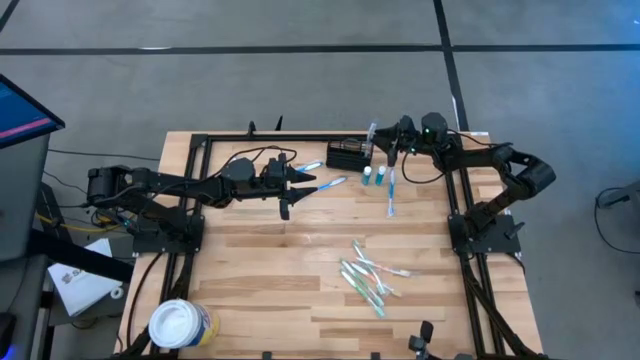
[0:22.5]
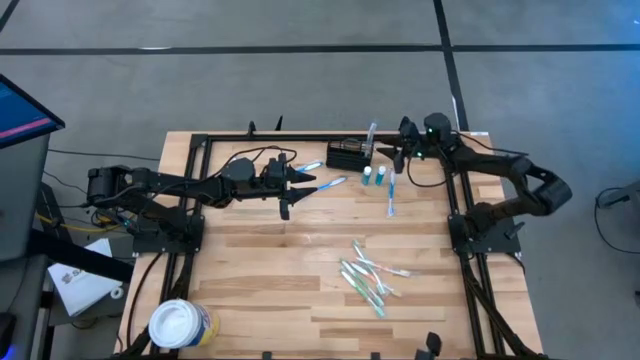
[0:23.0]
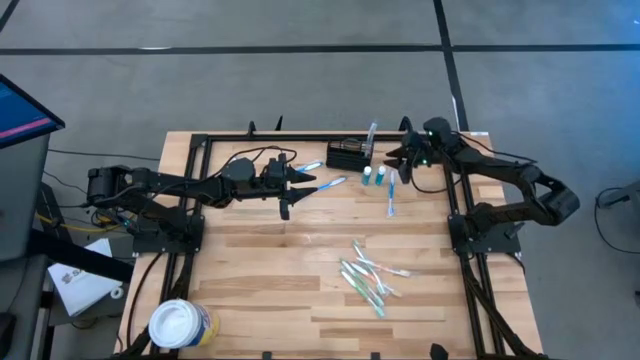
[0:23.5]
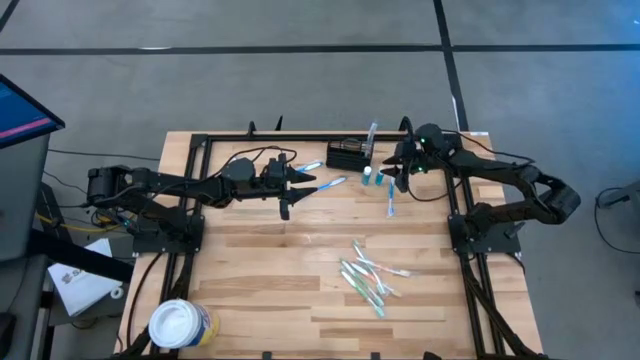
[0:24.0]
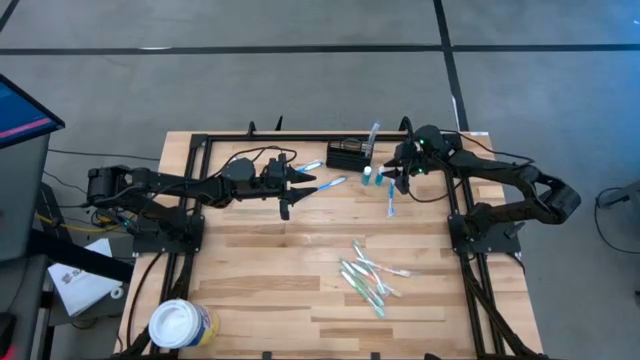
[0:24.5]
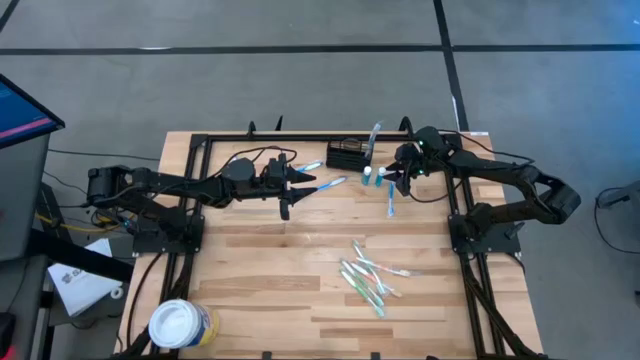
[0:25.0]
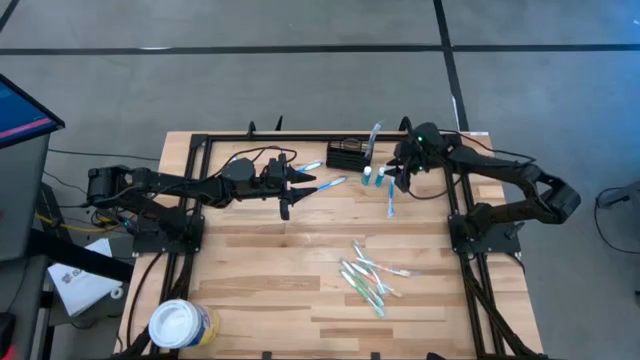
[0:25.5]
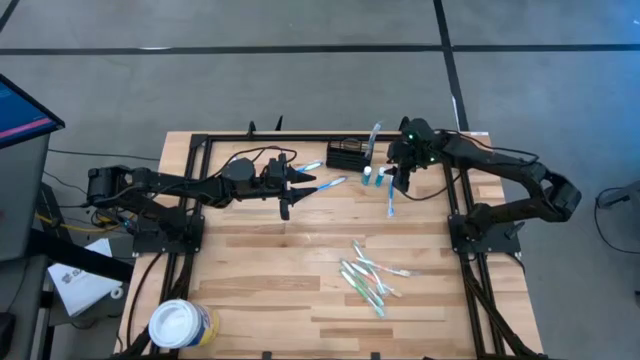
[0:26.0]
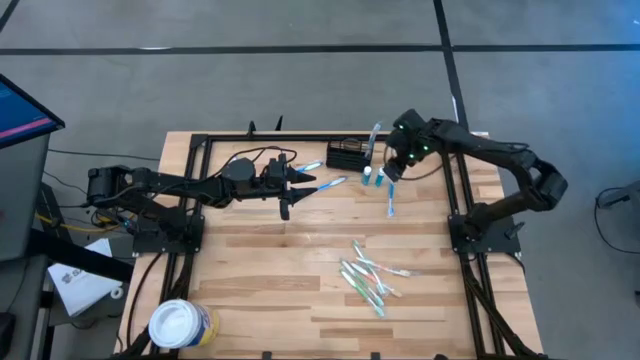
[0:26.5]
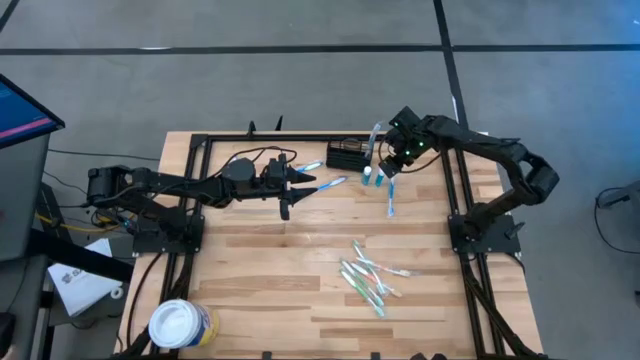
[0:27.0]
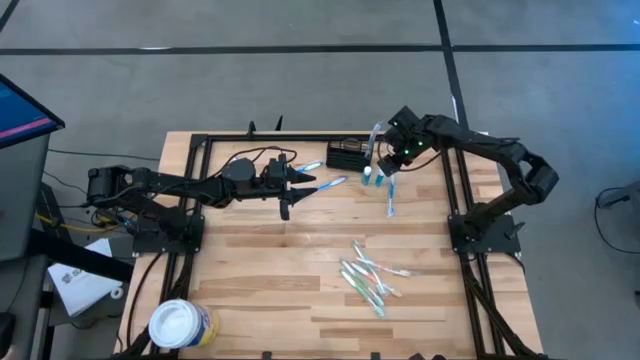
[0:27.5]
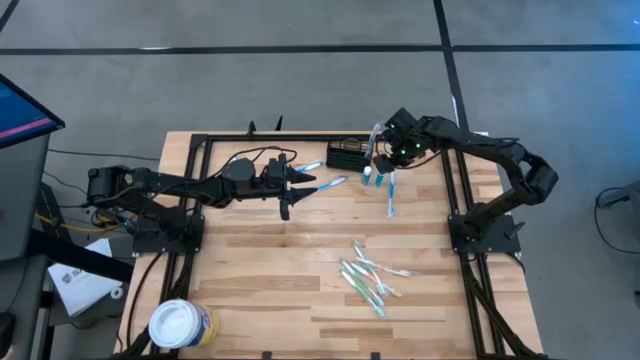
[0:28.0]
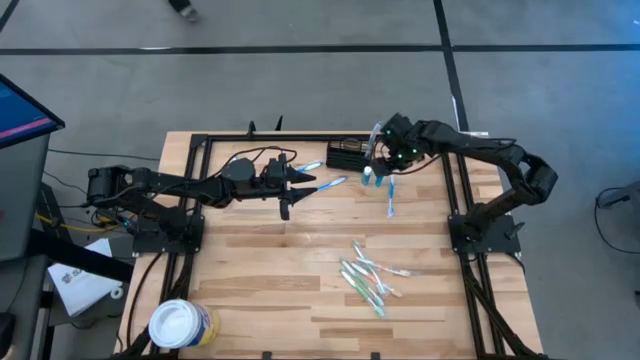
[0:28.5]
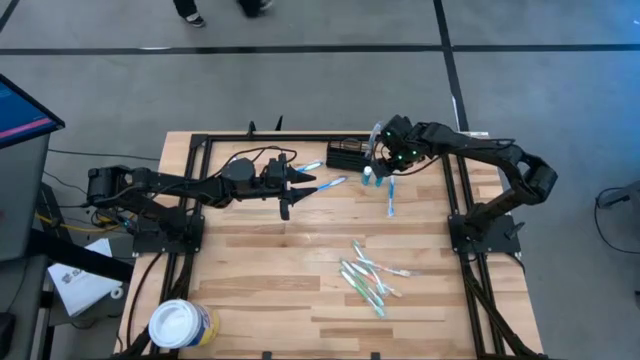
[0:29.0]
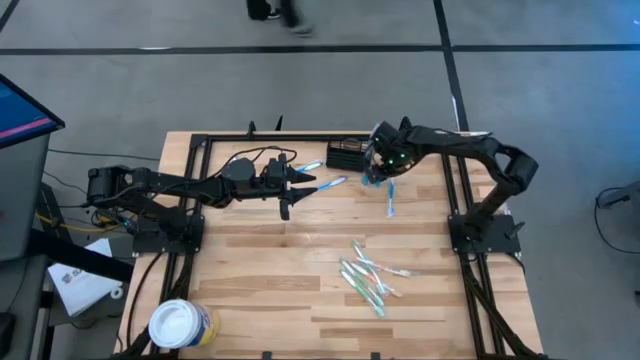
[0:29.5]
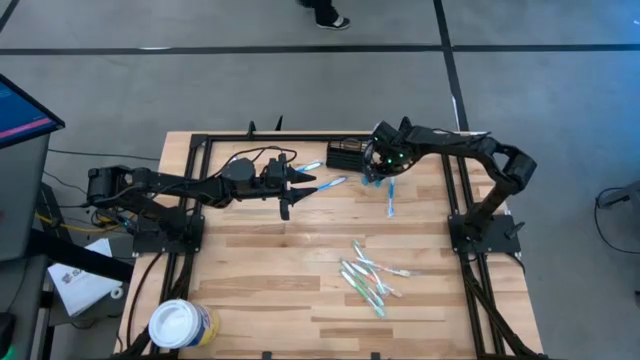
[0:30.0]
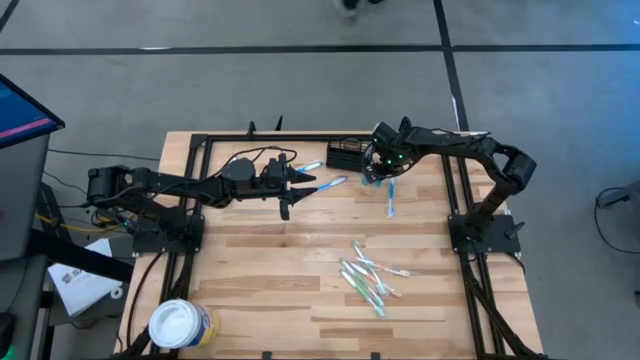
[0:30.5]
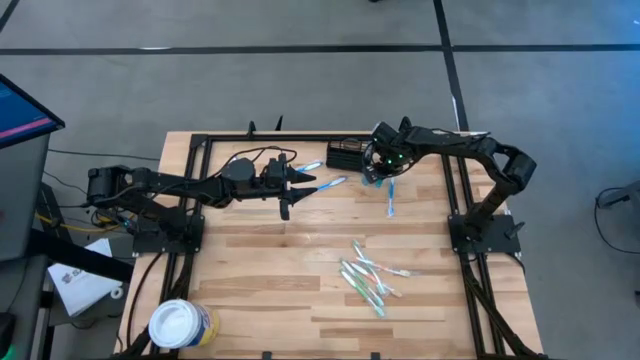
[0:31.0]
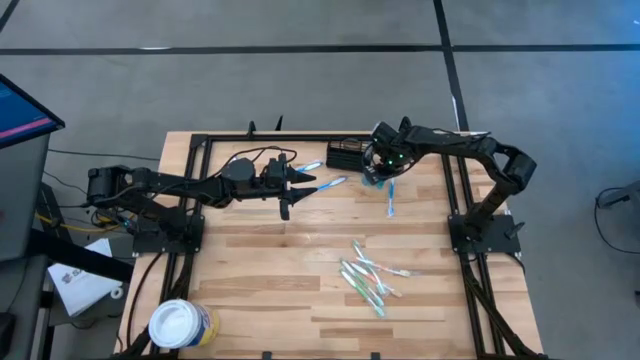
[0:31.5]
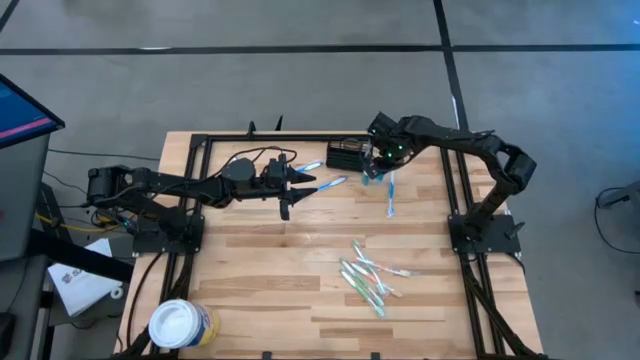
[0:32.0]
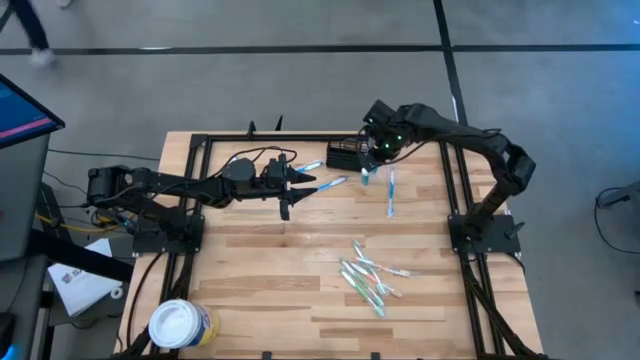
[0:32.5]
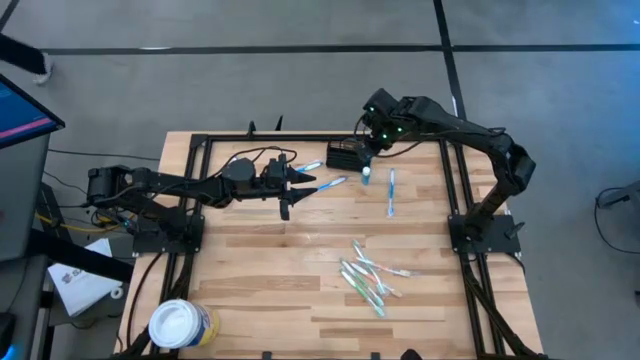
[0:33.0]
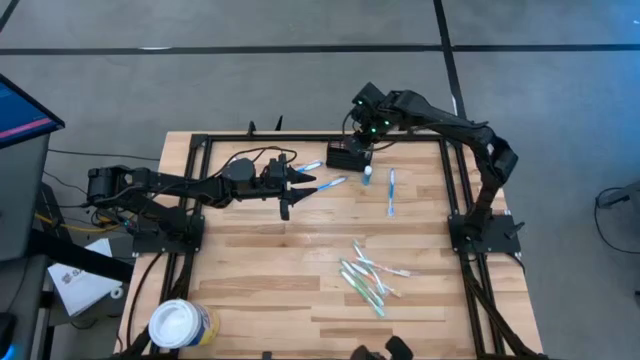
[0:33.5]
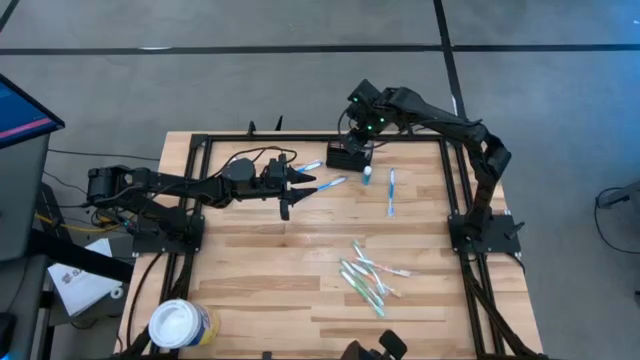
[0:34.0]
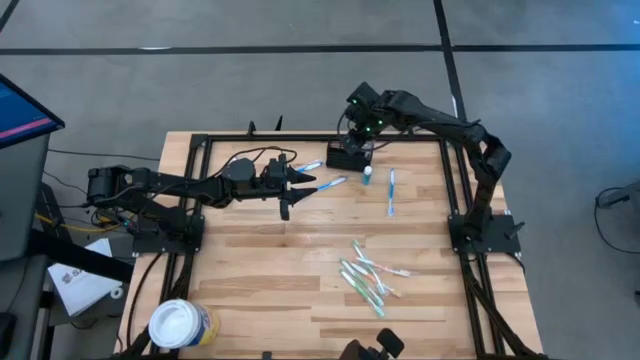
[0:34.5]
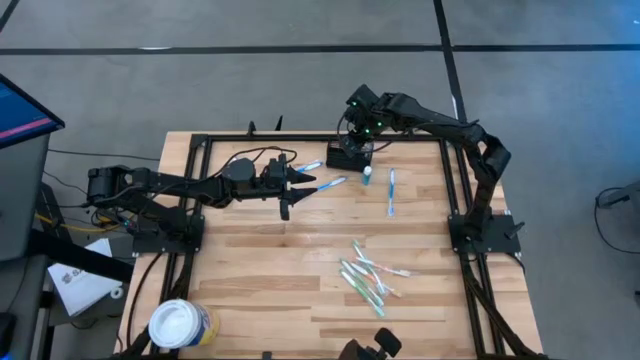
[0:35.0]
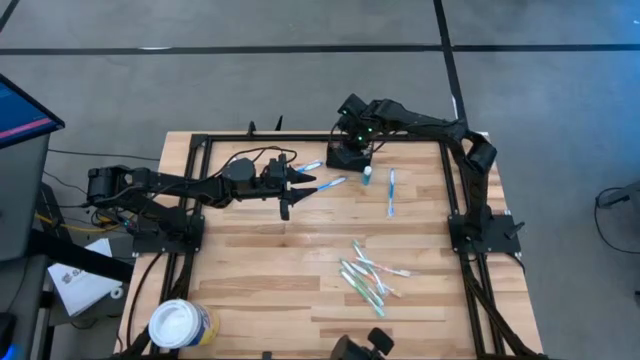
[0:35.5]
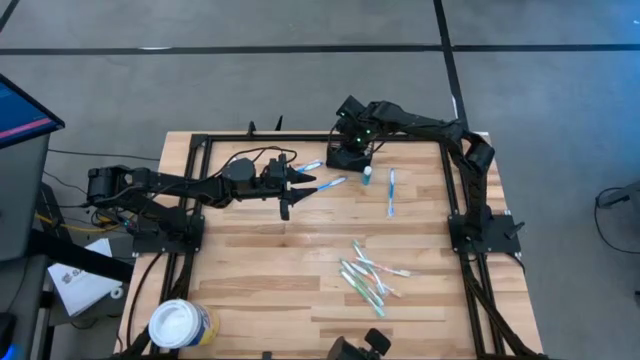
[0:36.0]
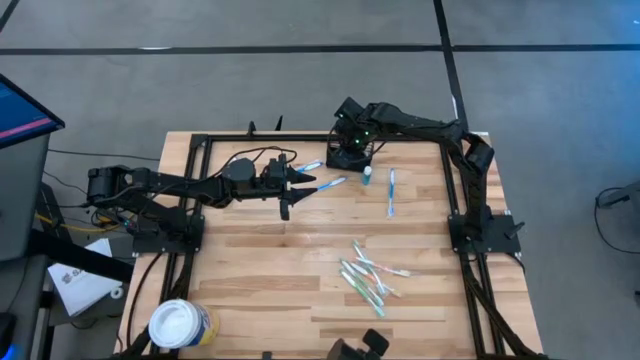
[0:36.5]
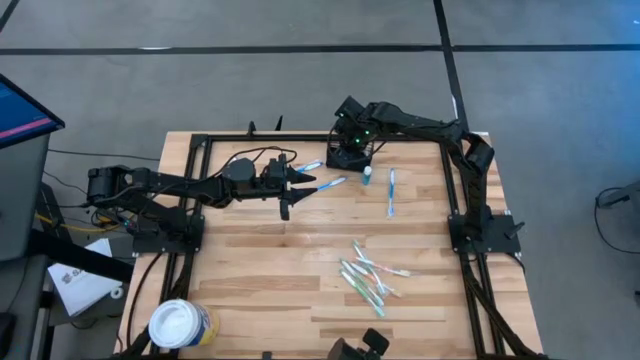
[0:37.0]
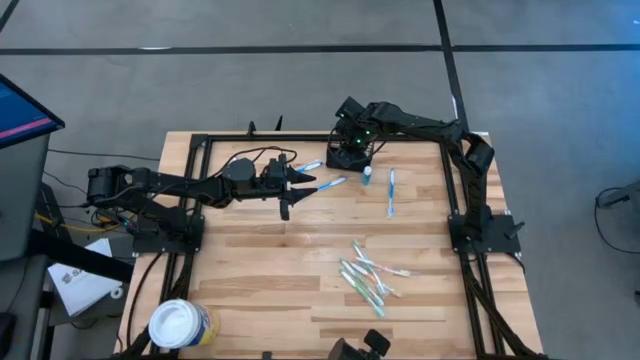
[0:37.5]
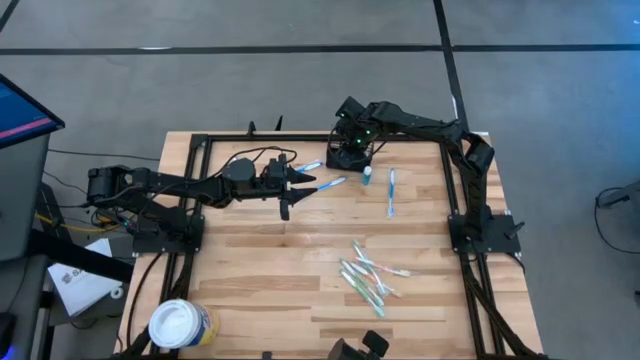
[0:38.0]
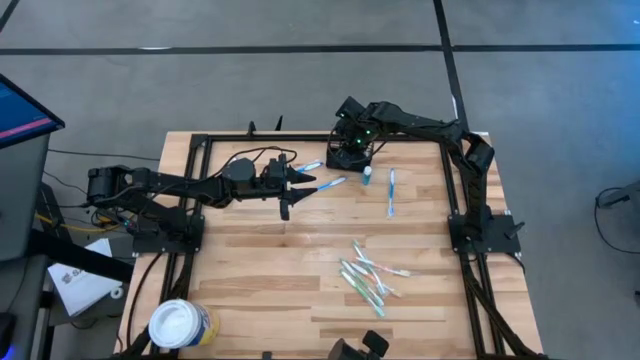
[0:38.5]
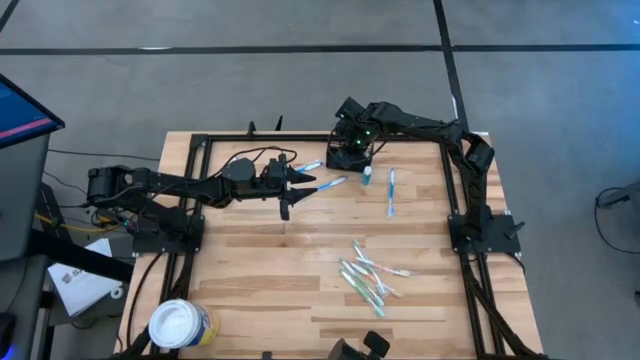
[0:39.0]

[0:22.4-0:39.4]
Task: Pick & Place toothbrushing station
Put the mouthwash into the mesh organizer

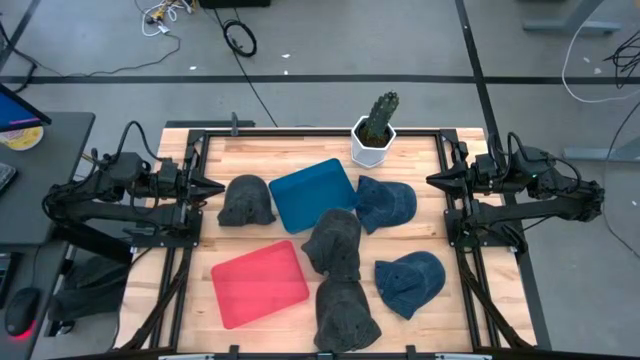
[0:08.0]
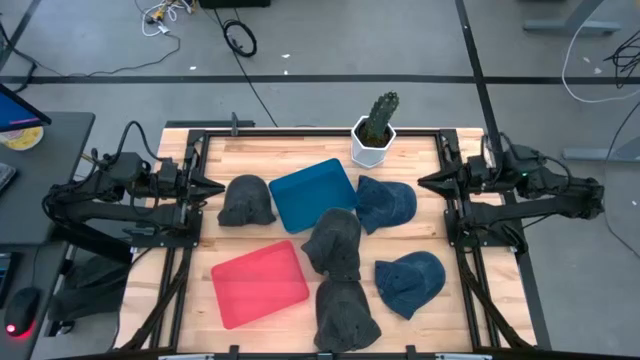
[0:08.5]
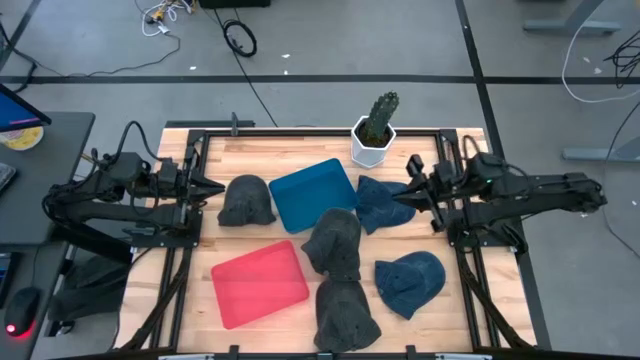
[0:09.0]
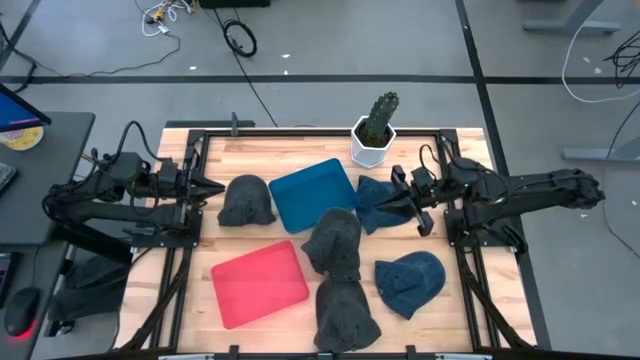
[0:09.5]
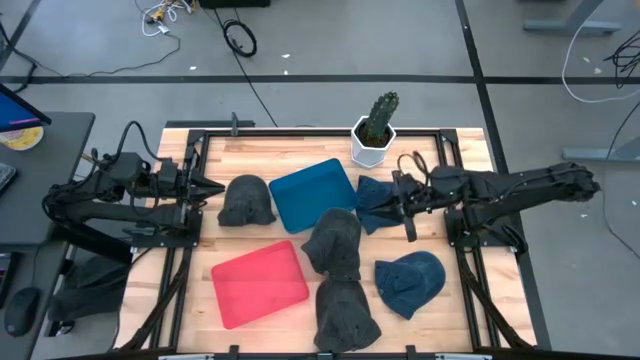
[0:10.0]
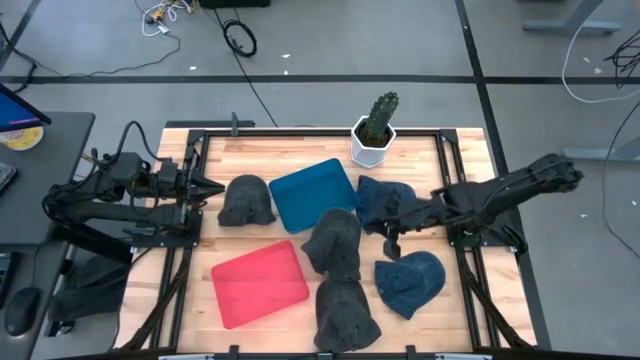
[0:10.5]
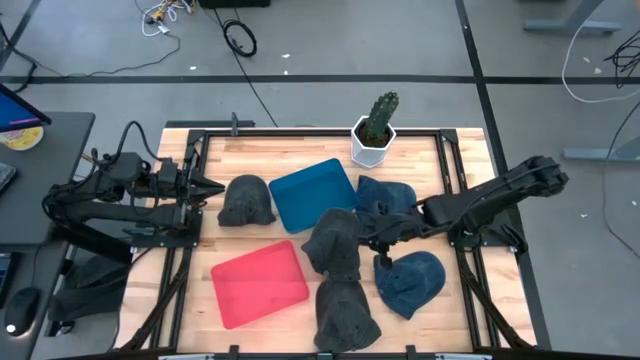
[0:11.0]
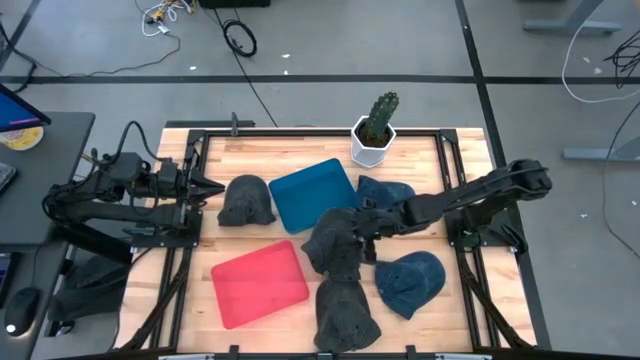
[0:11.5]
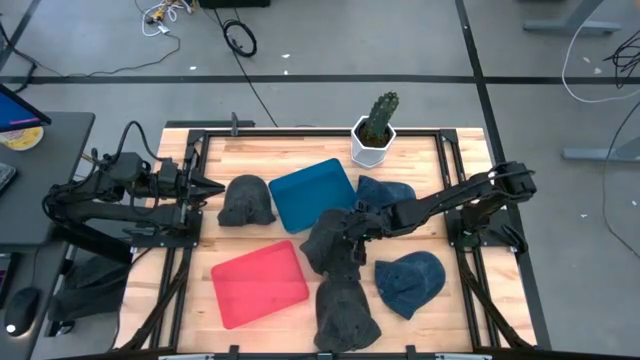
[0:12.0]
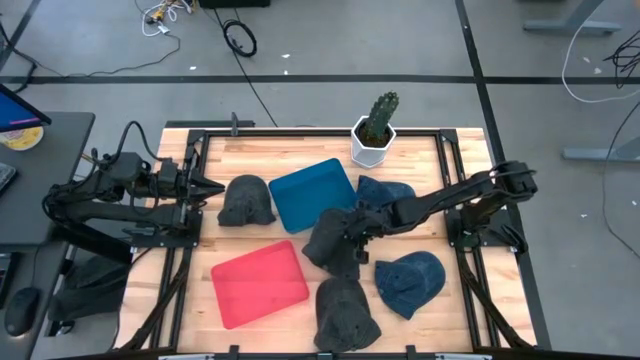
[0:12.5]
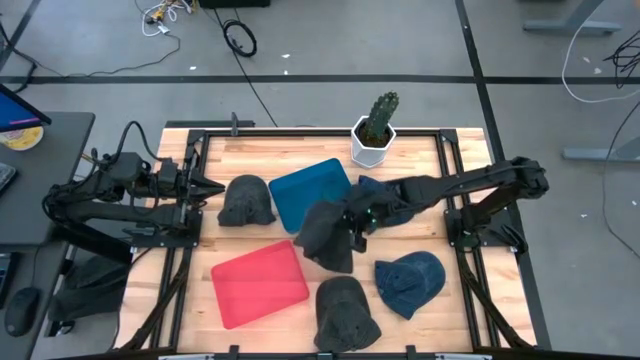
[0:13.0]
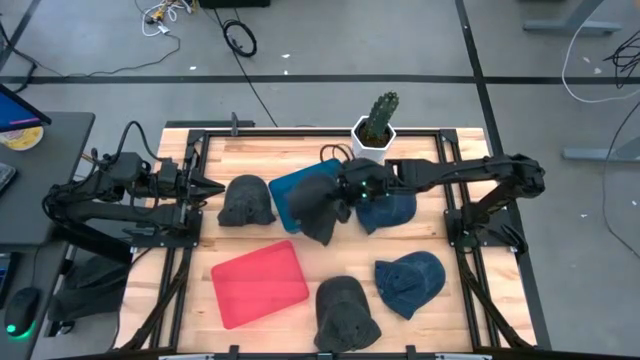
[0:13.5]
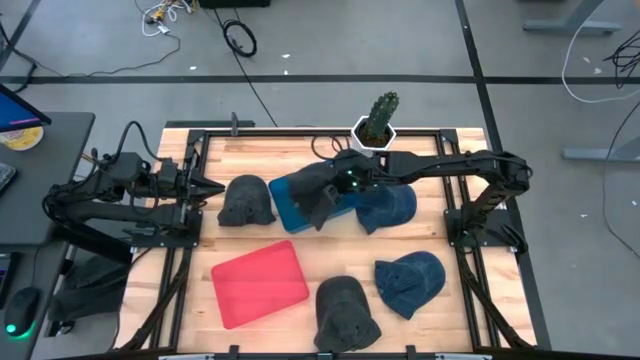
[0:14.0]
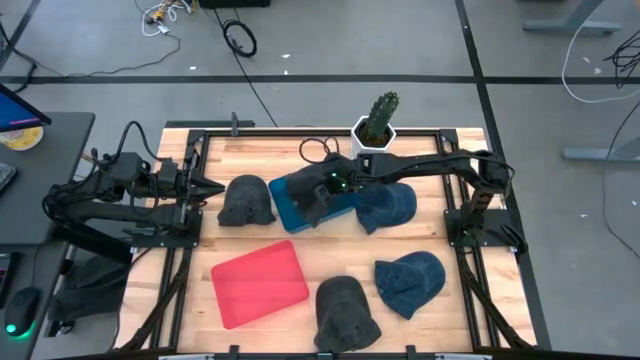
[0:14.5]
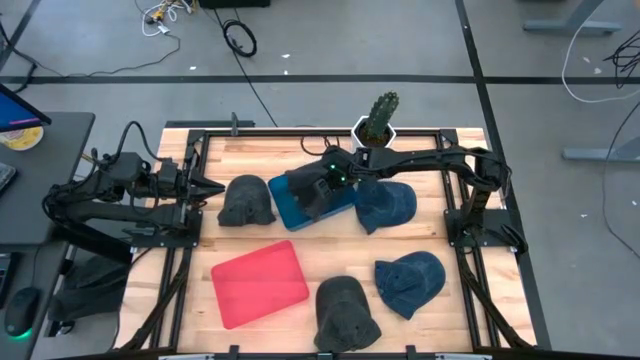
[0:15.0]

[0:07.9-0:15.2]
Task: Pick & Place hat
Put the middle gray cap into the blue bin
